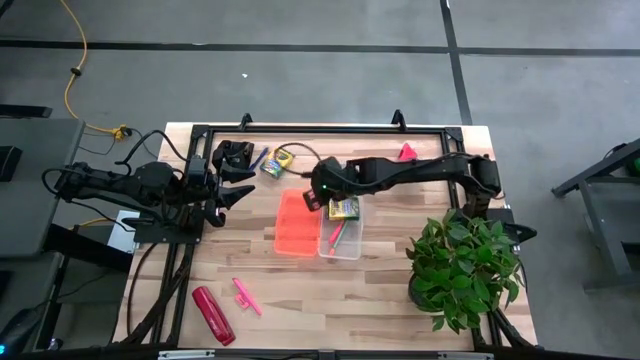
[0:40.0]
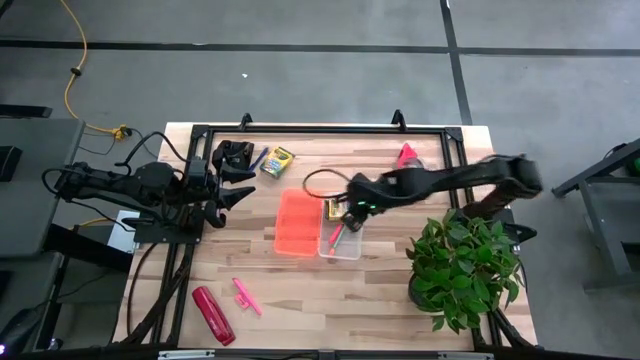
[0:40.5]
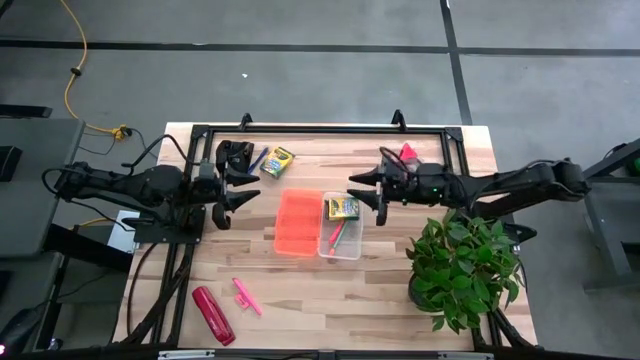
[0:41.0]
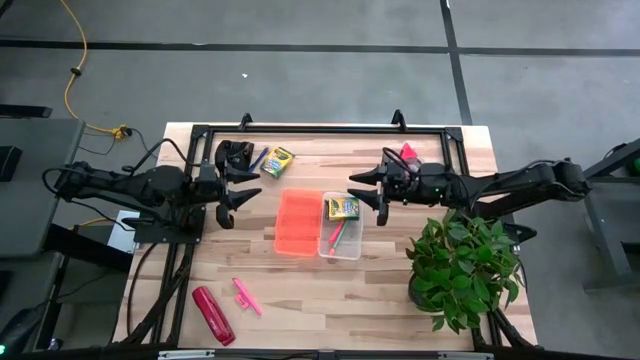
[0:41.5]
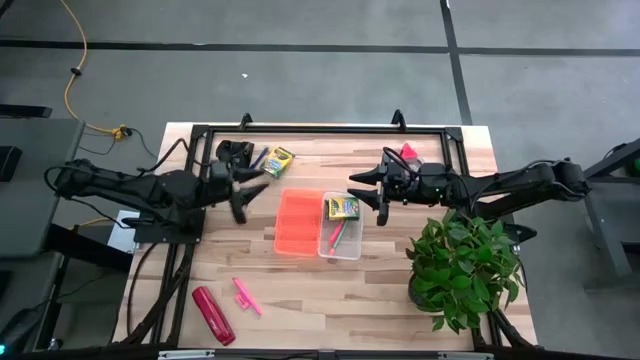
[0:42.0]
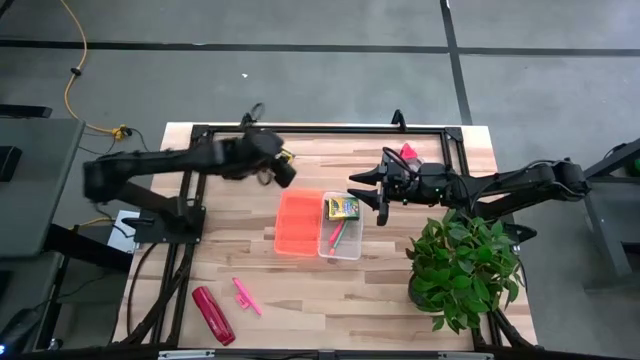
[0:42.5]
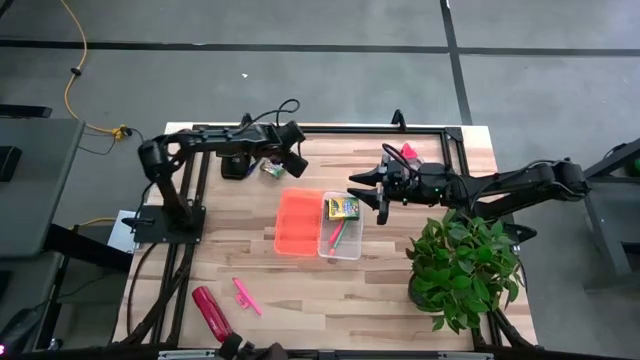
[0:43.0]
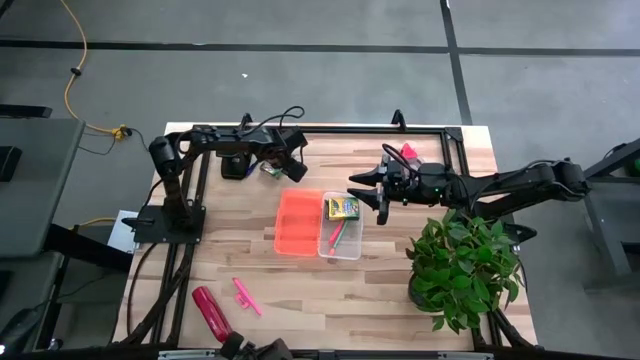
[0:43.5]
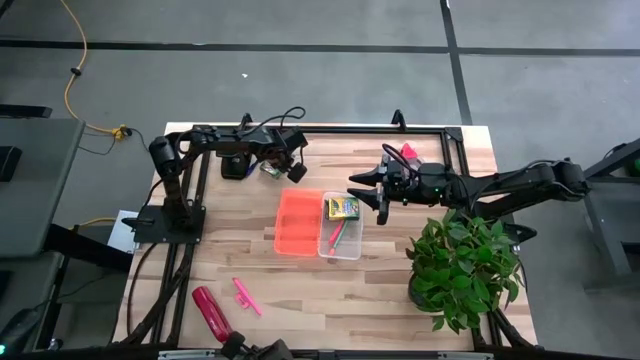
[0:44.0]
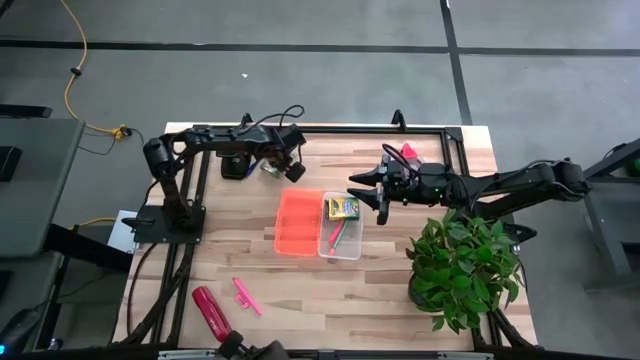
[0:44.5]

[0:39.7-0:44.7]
Task: Pack school essentials
Put the crayon box in the supply box

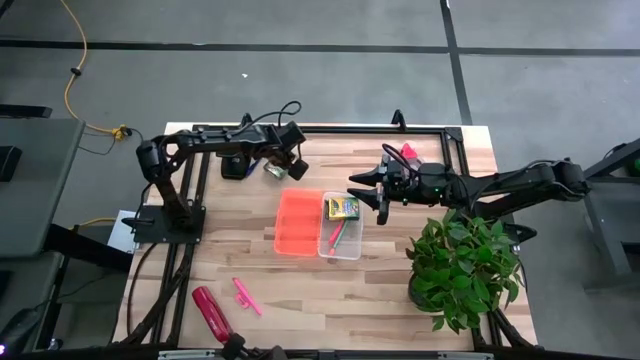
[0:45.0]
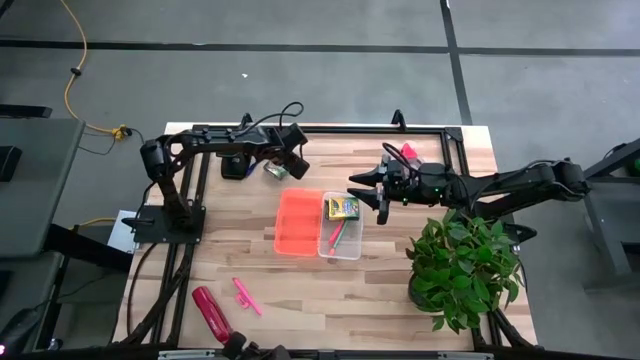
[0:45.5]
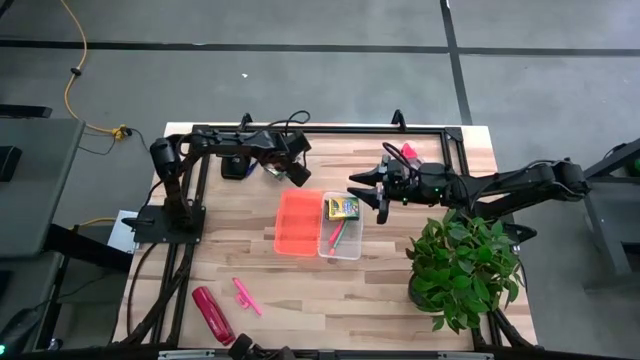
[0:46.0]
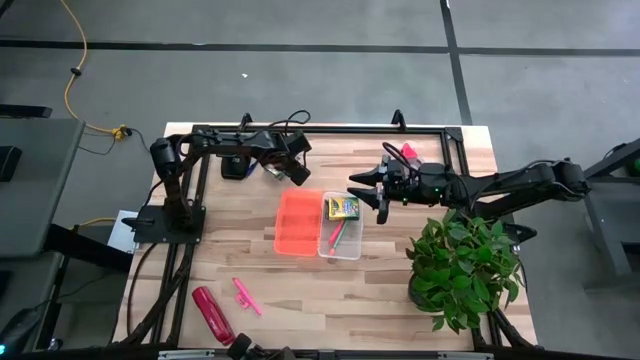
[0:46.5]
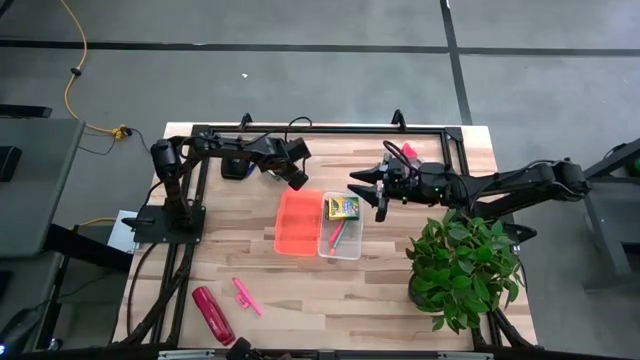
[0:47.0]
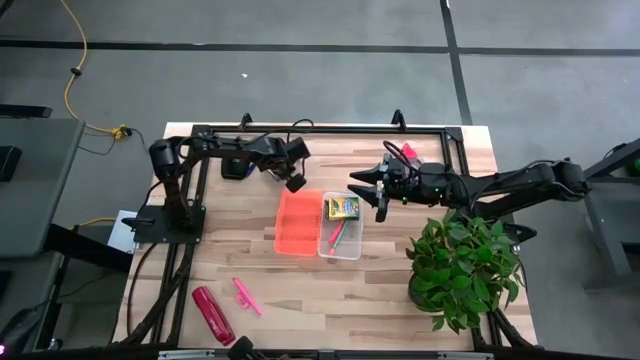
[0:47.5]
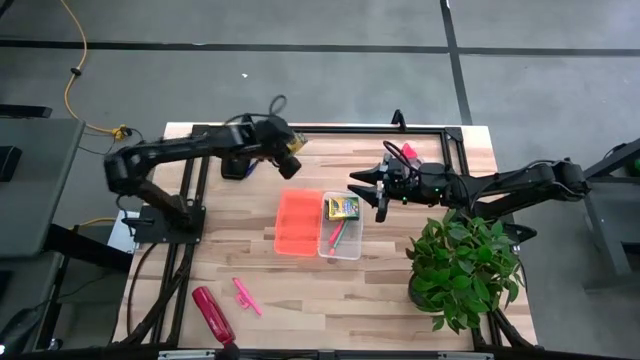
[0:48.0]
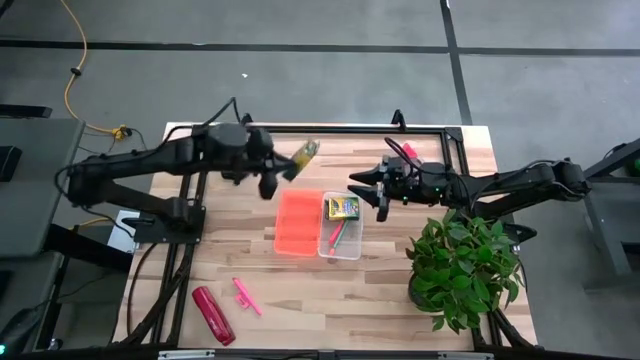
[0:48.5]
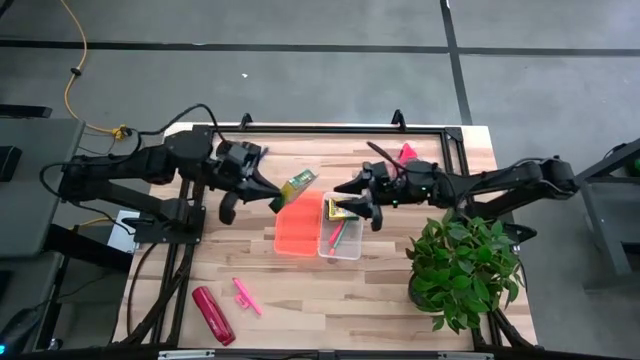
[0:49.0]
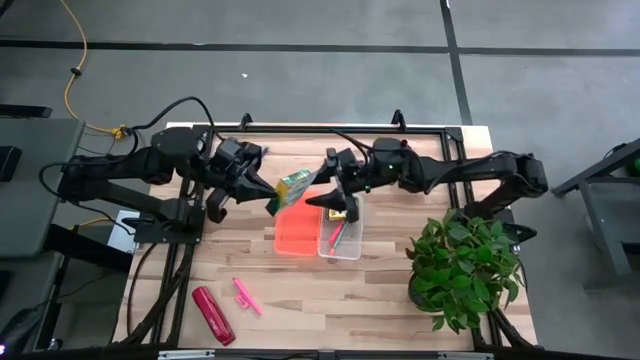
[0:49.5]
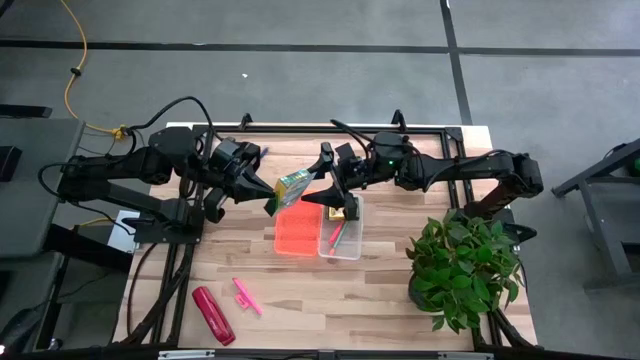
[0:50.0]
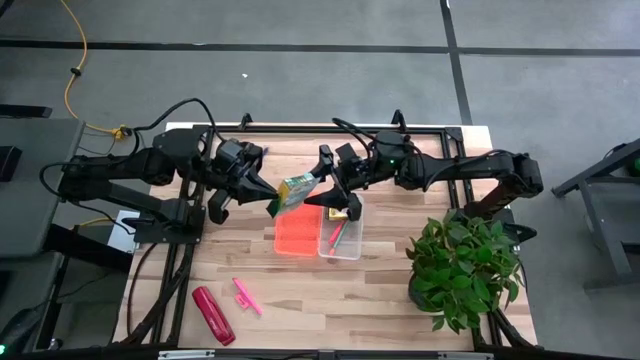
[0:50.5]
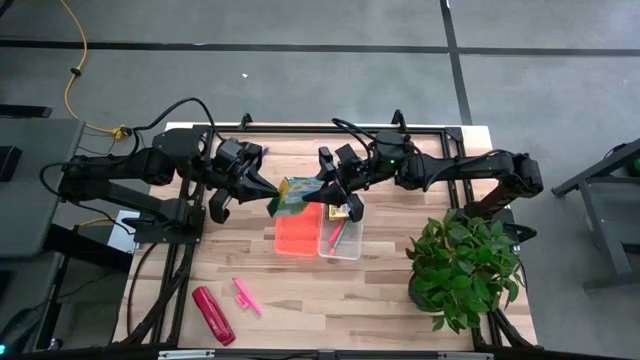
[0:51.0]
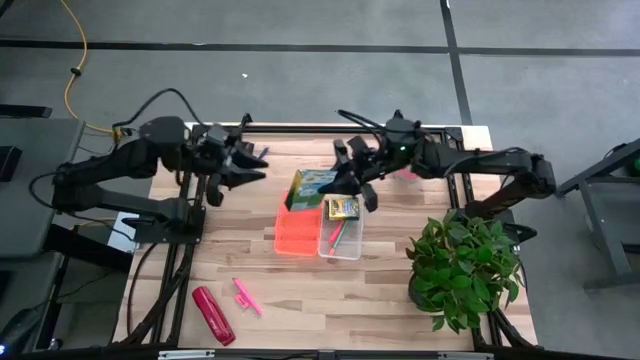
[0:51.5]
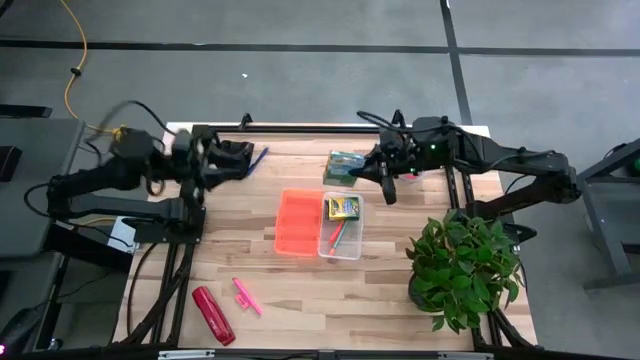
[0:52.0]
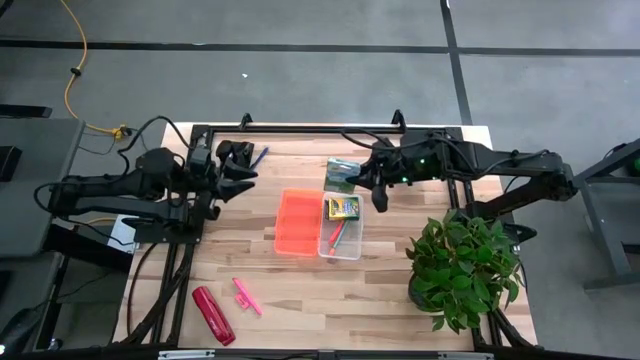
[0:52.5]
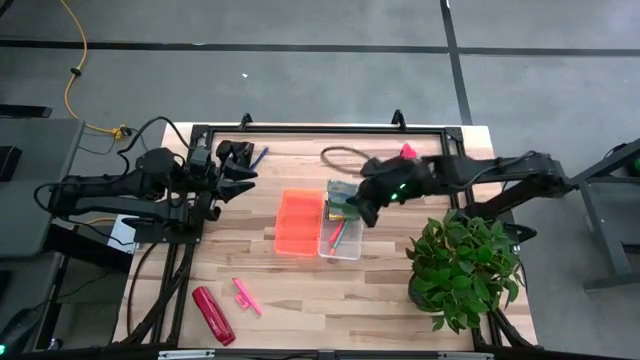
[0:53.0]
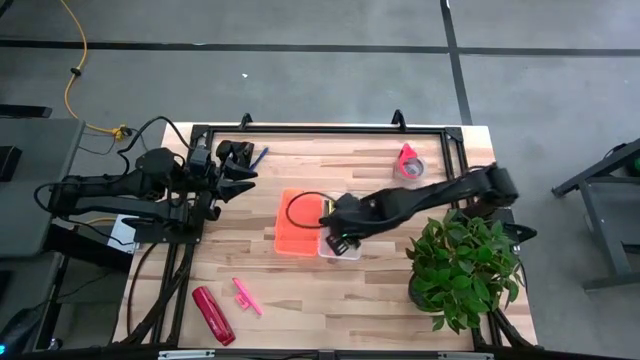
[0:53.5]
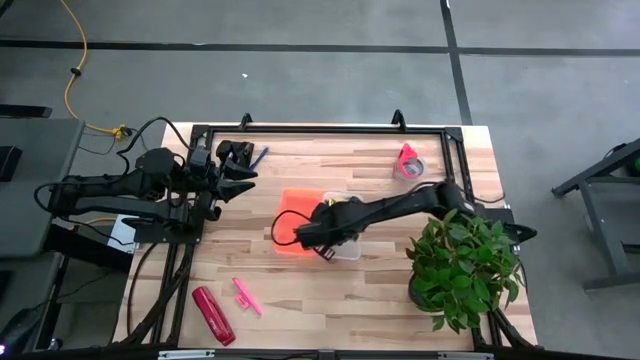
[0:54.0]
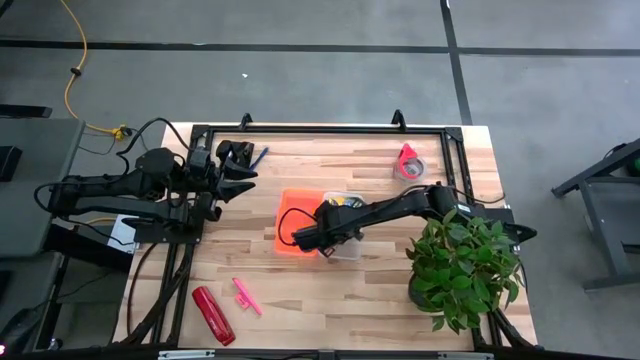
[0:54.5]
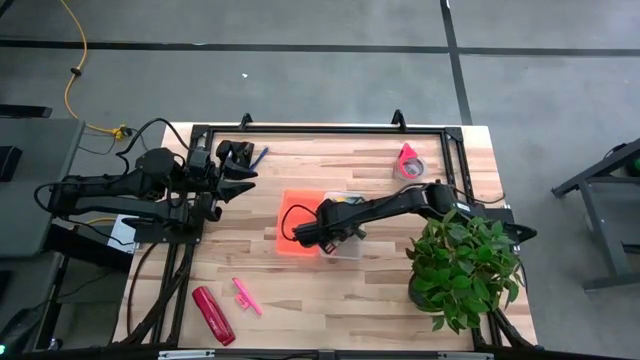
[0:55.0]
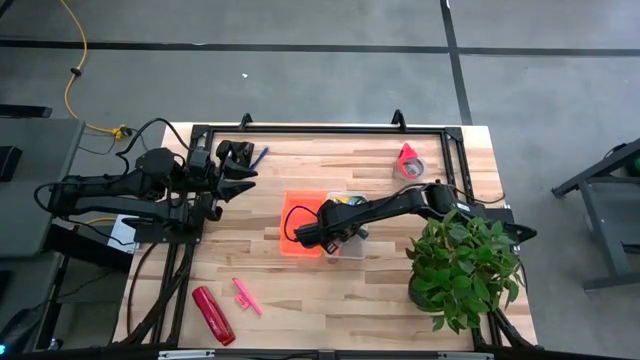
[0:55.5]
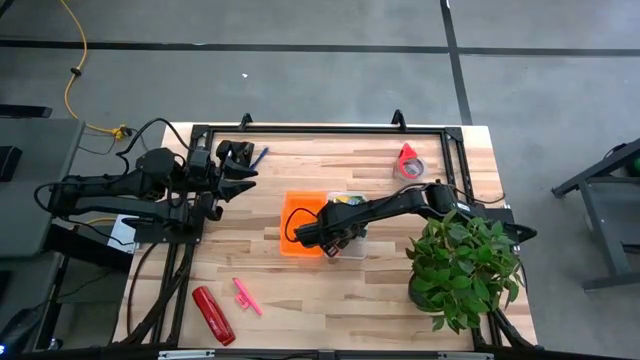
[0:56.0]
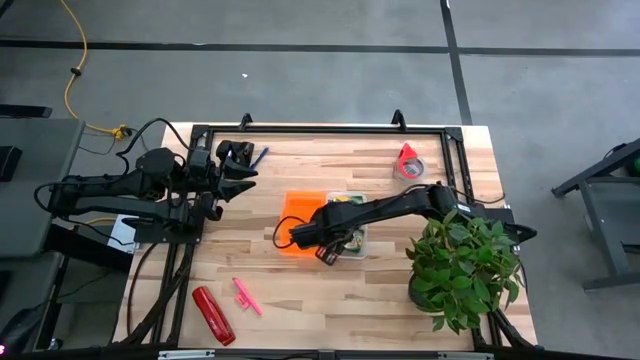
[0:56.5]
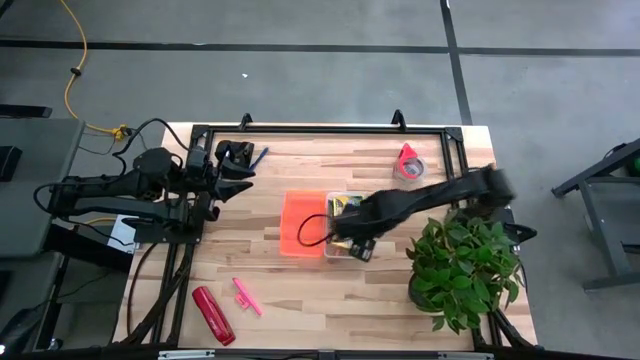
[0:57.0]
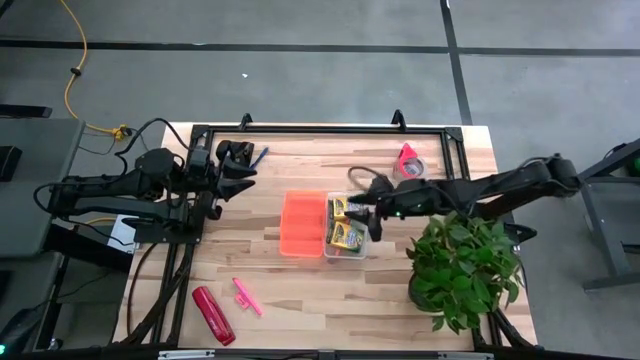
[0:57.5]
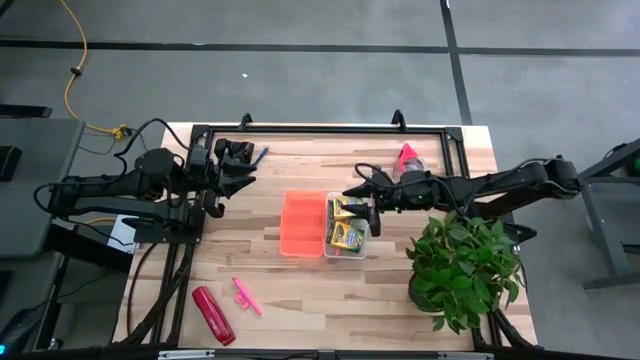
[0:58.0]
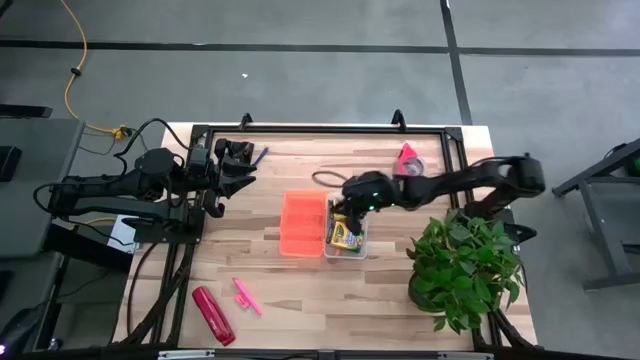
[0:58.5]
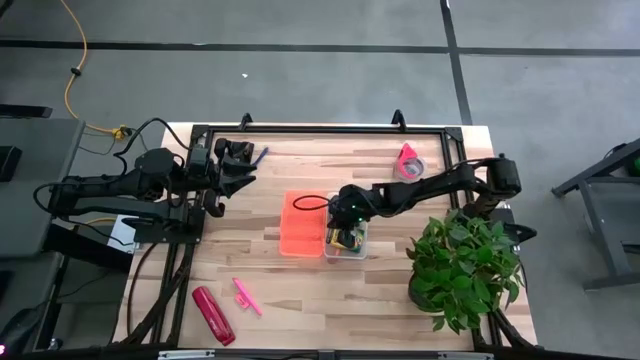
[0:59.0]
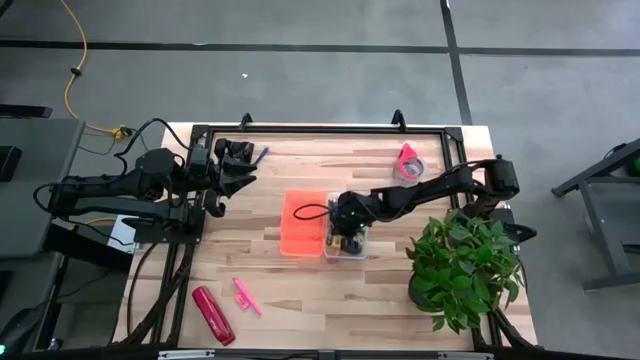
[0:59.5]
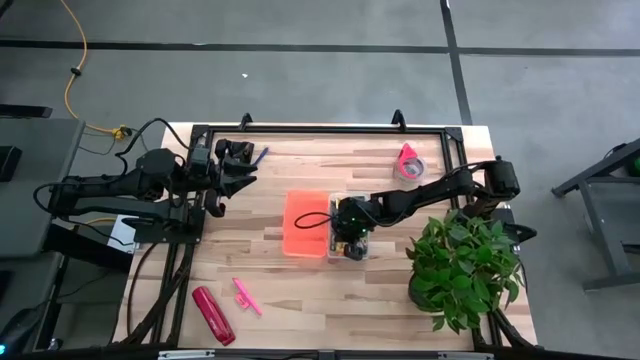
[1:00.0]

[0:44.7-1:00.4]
Put the crayon box in the supply box

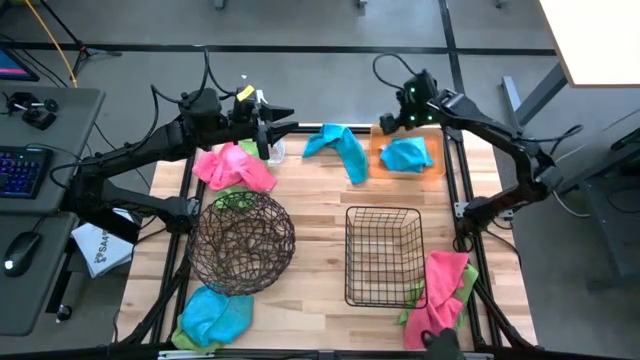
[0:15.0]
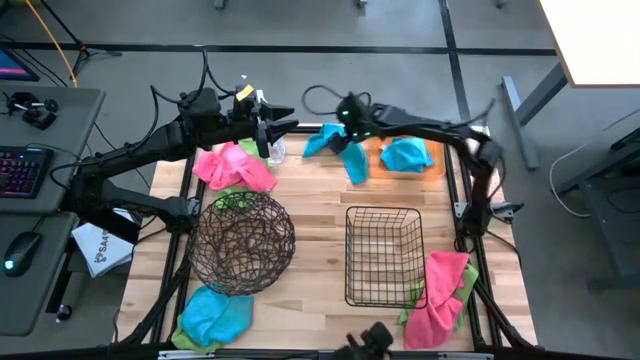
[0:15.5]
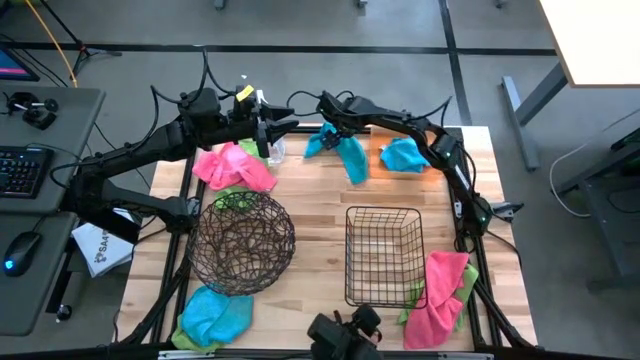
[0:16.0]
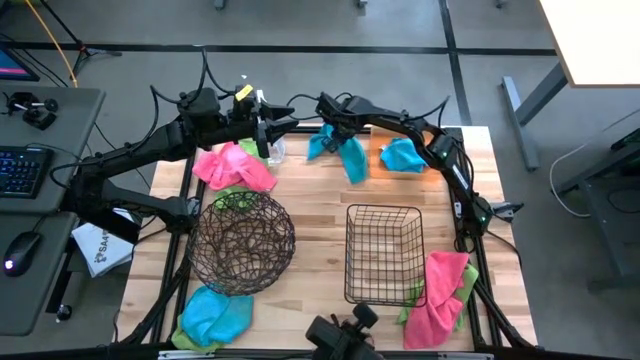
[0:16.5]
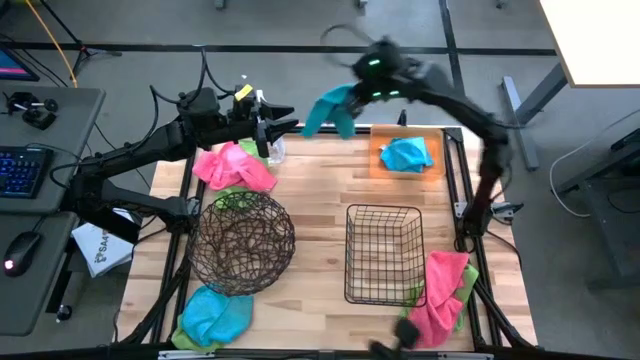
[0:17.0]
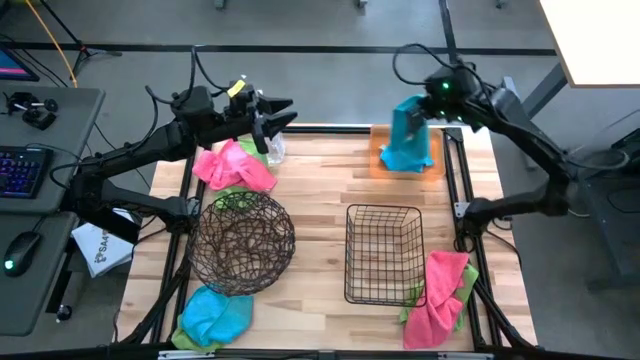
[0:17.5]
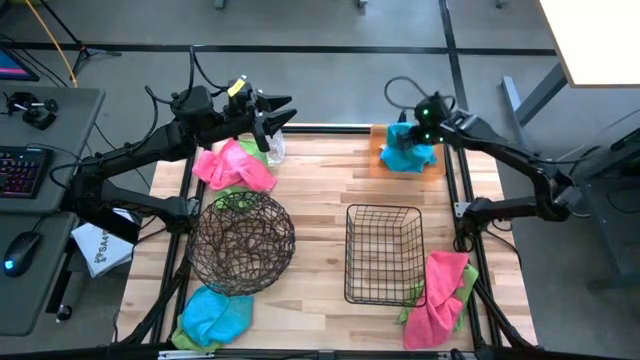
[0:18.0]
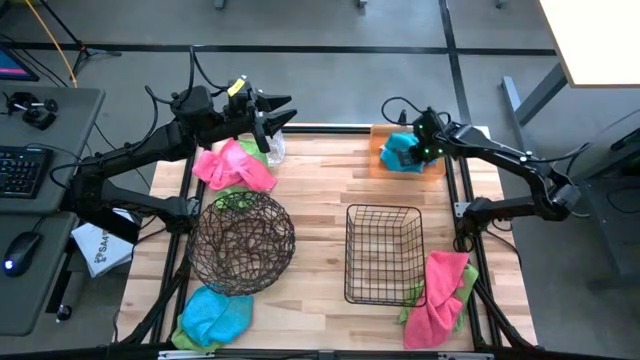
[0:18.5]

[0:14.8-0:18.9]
Task: Sort microfiber towel by color & place in baskets
Put the top blue towel into the orange transparent bin
